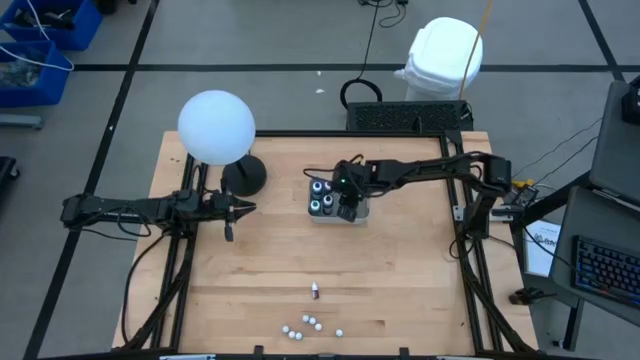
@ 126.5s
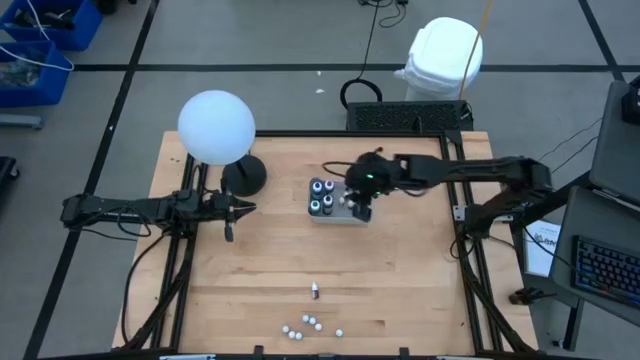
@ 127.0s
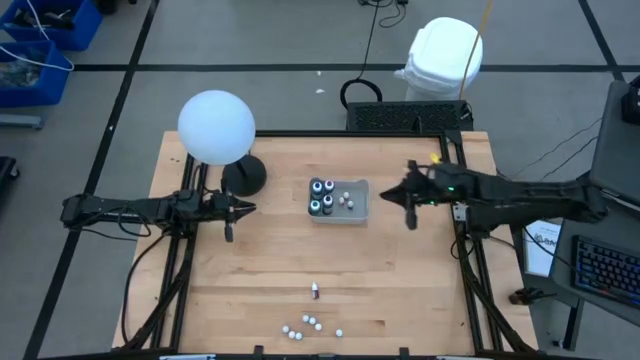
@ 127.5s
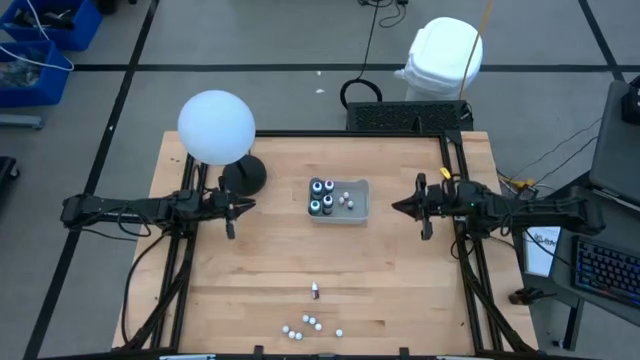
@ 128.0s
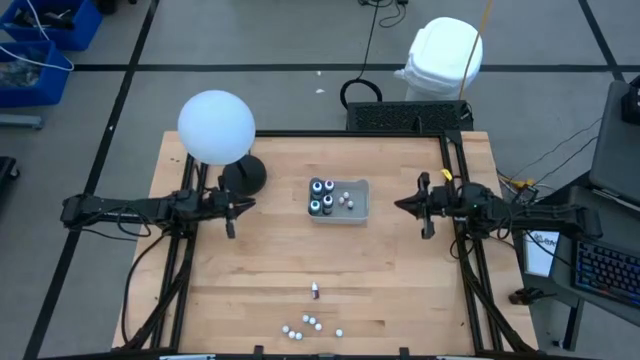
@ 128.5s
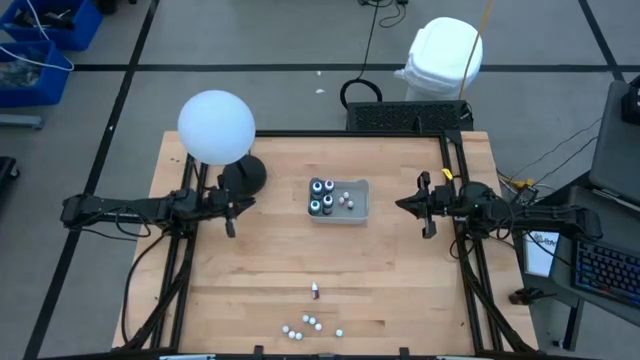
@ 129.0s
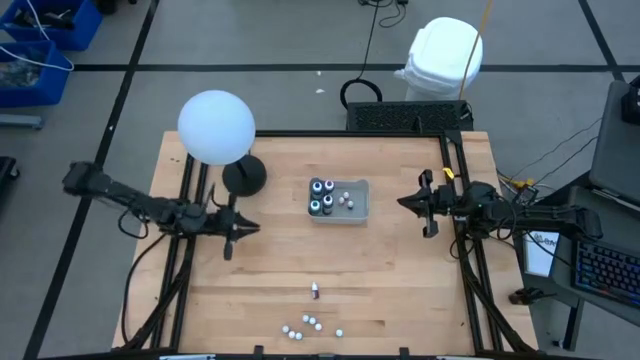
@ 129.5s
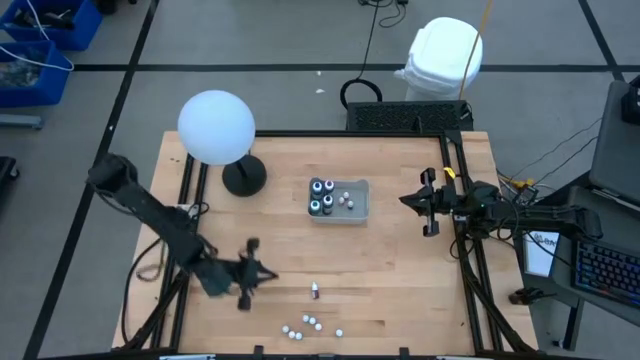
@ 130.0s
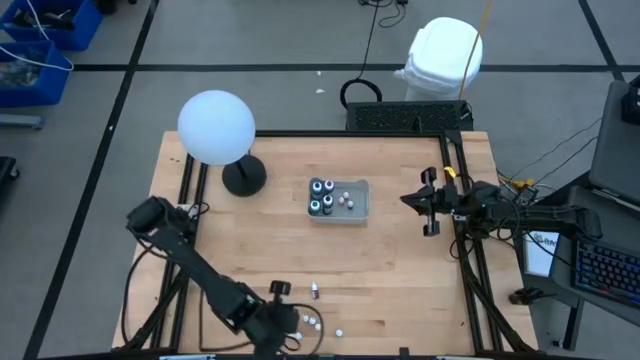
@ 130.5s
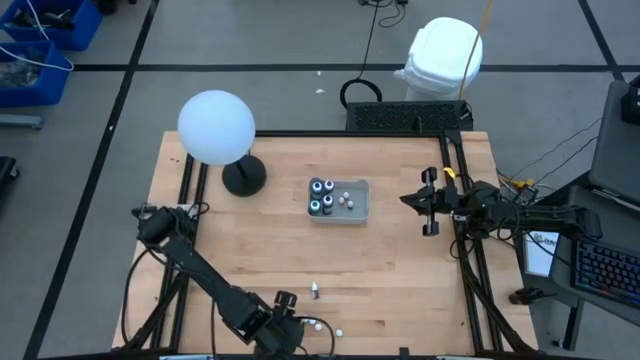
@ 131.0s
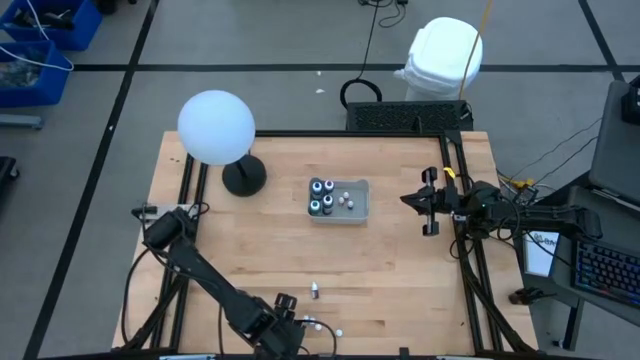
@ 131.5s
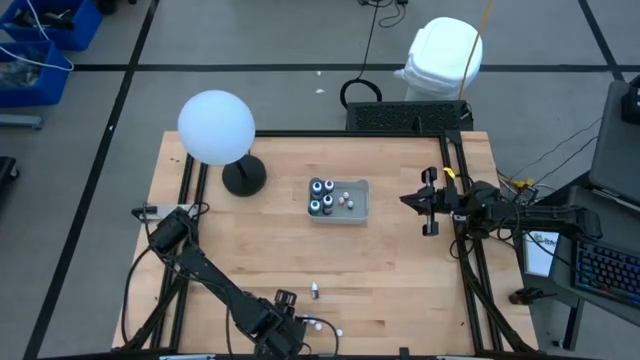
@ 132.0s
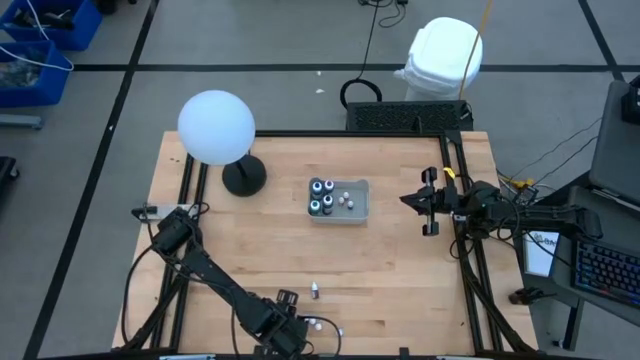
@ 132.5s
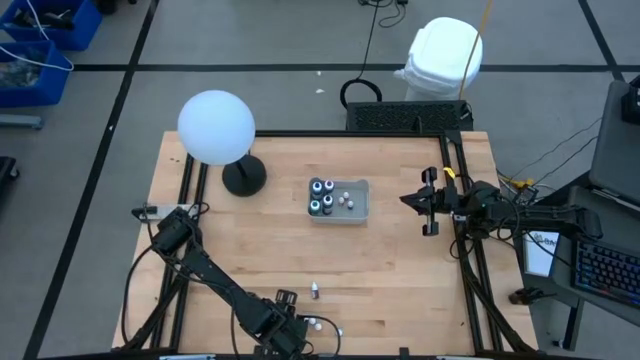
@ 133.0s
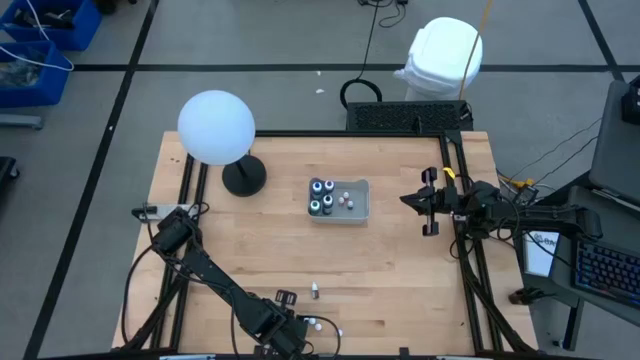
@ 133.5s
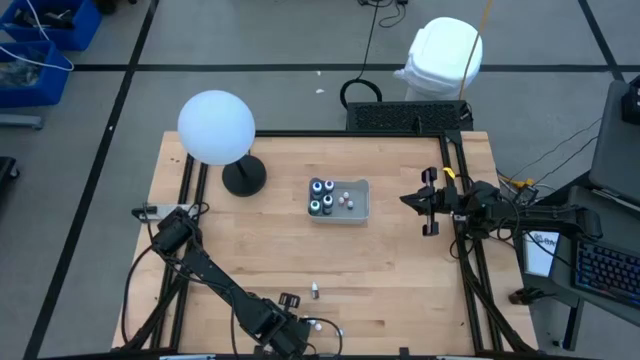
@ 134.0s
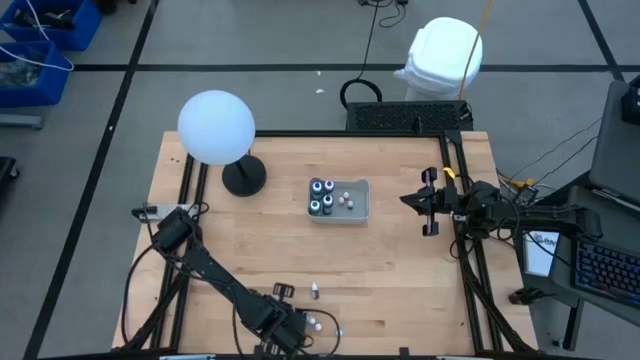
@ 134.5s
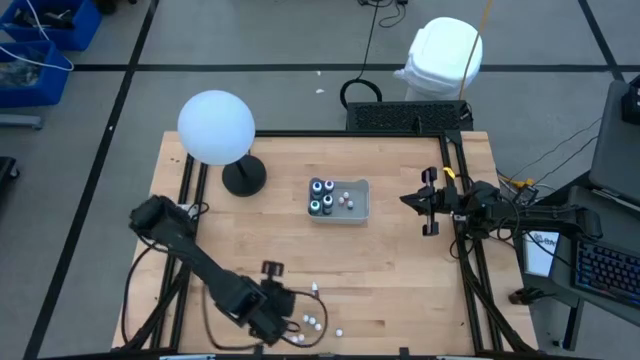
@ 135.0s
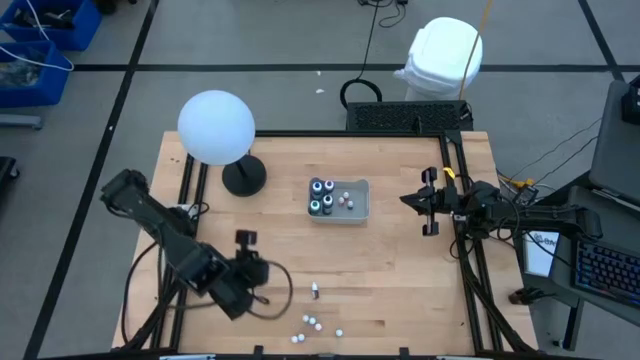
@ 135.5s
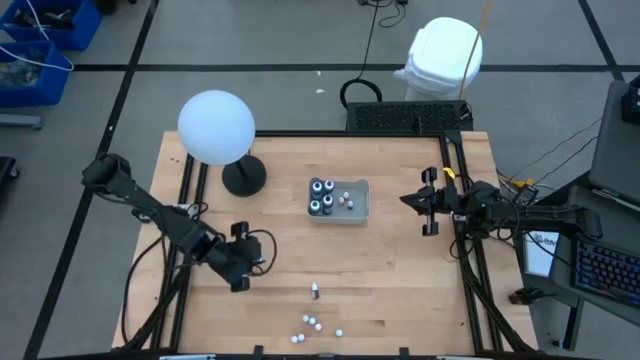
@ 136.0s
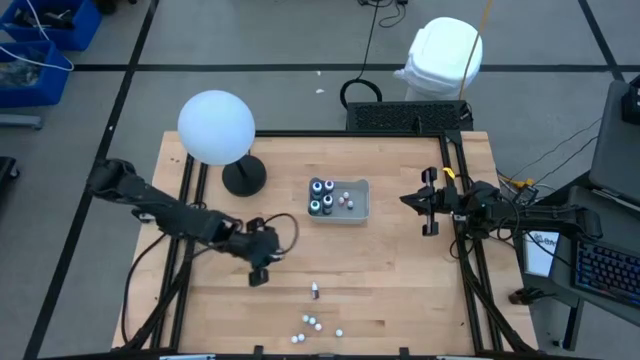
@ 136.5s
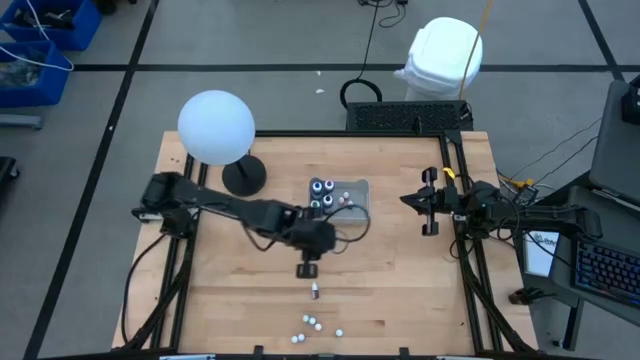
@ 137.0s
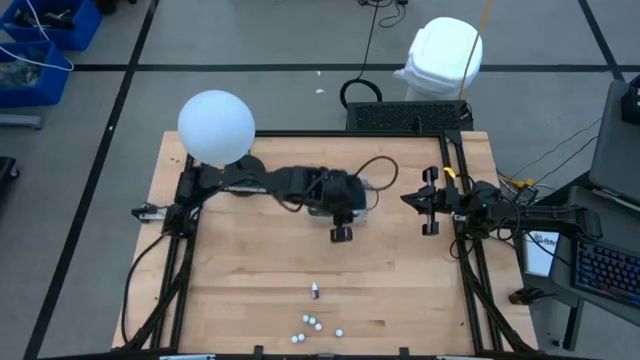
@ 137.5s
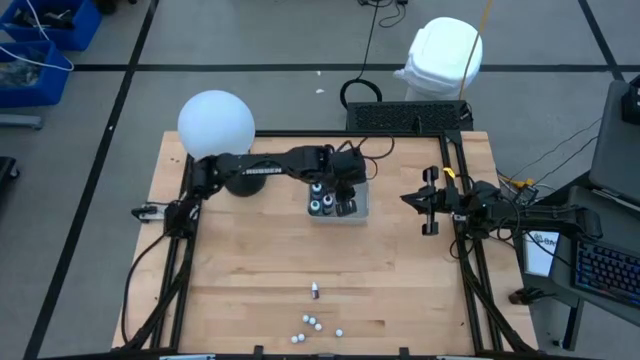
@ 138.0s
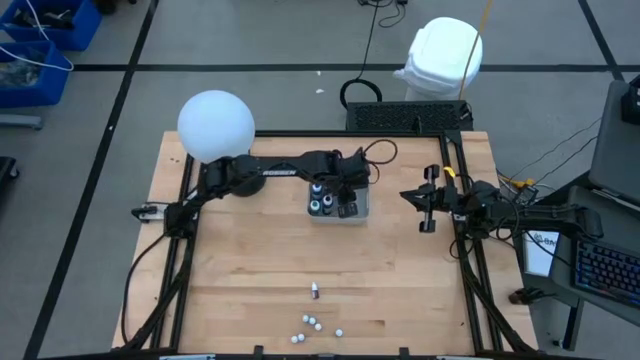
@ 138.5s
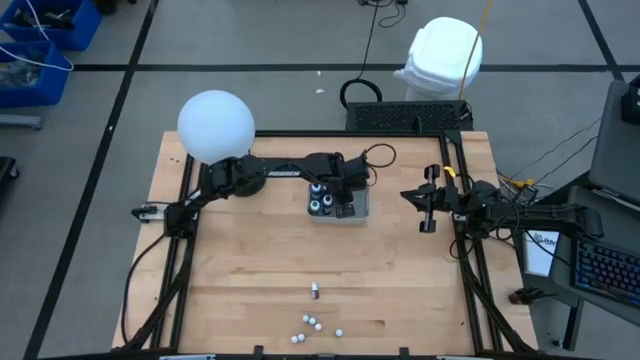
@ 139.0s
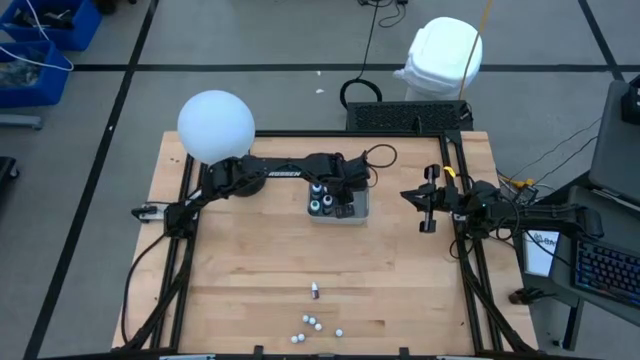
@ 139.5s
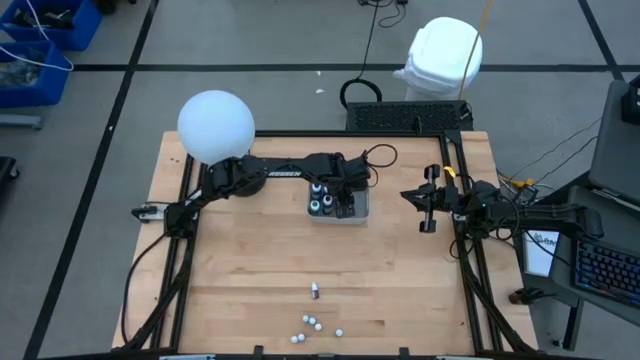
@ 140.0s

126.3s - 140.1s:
Task: Pick & Place food coloring
Put the left small blue food coloring bottle into the gray bin

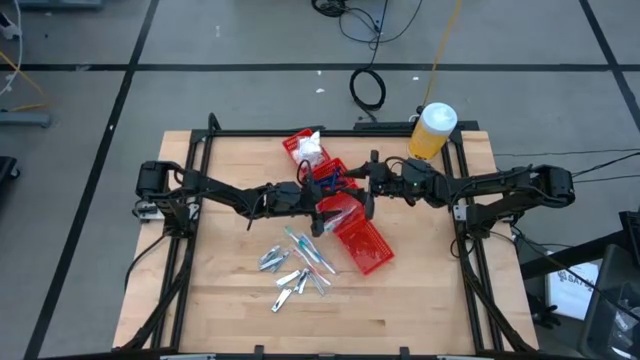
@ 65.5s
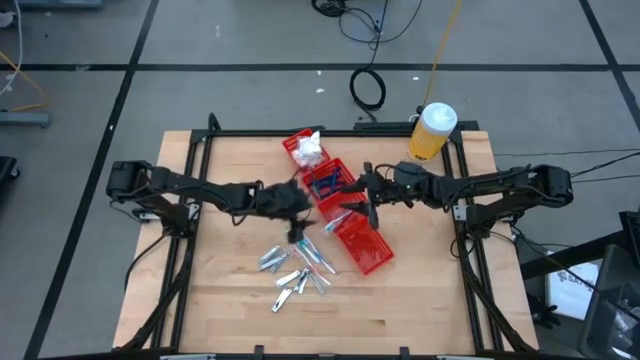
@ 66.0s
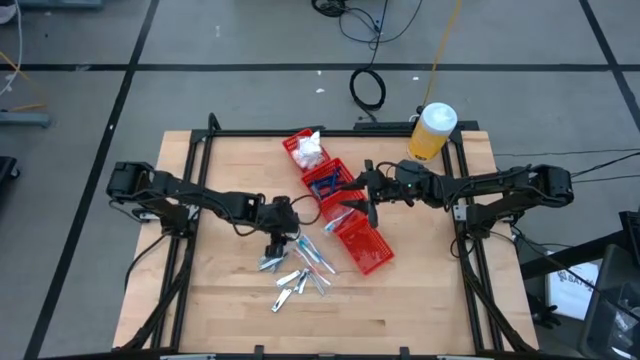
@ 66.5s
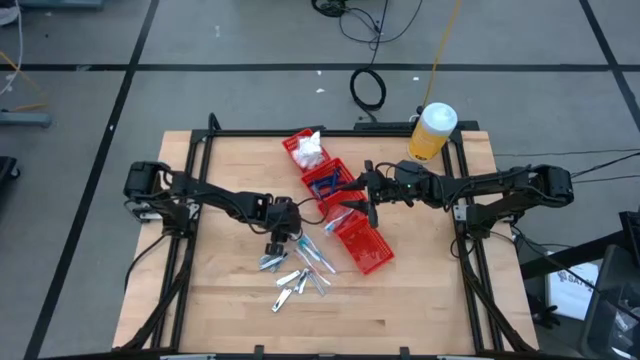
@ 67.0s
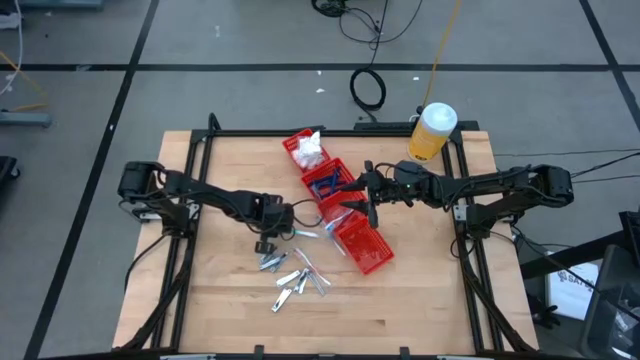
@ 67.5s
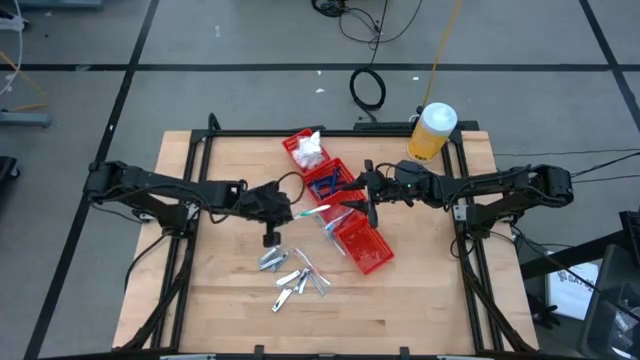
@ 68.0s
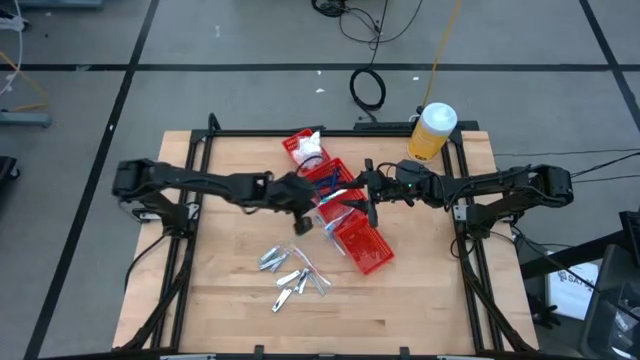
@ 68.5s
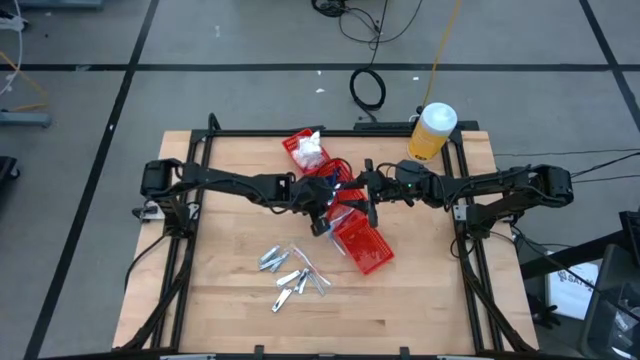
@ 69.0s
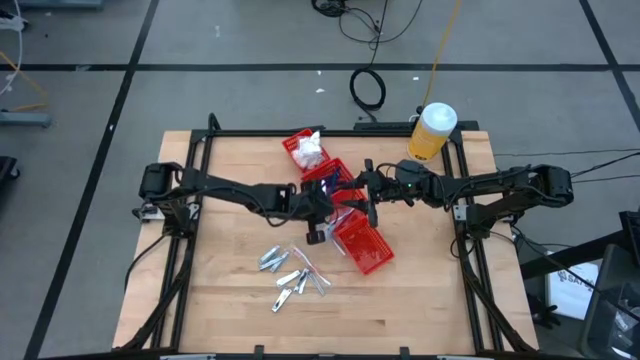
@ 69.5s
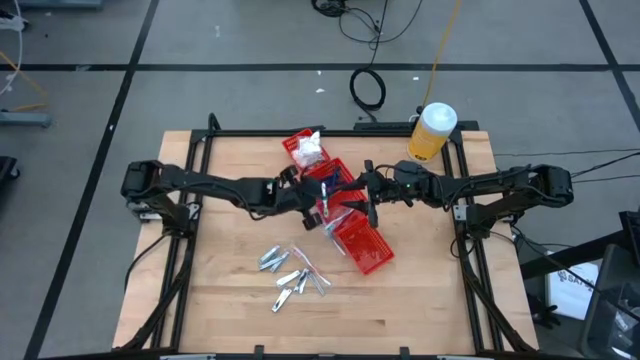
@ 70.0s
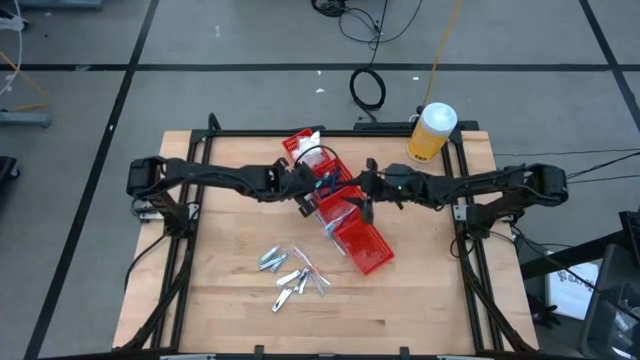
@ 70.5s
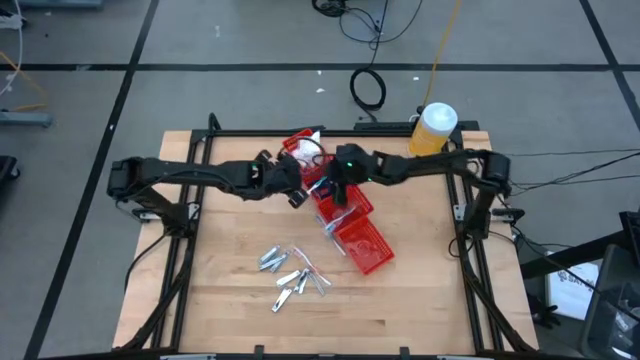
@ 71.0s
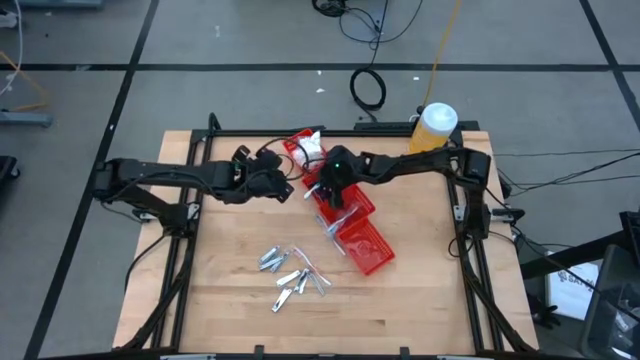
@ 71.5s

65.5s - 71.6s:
Task: Pick & Place Travel size toiletries
Put the green toothbrush into the bottom middle red bin

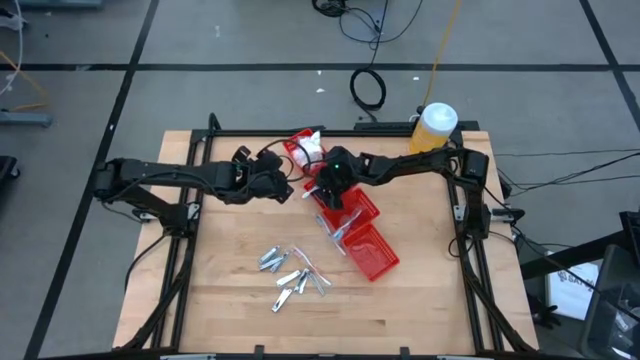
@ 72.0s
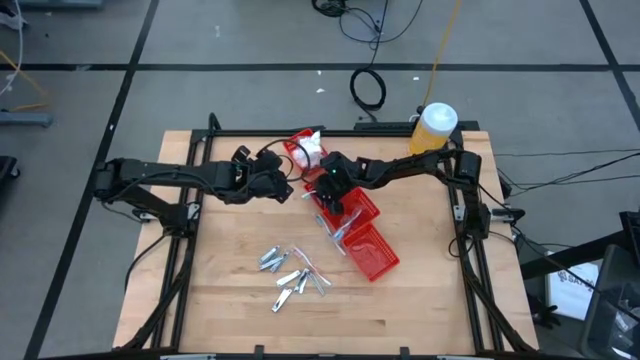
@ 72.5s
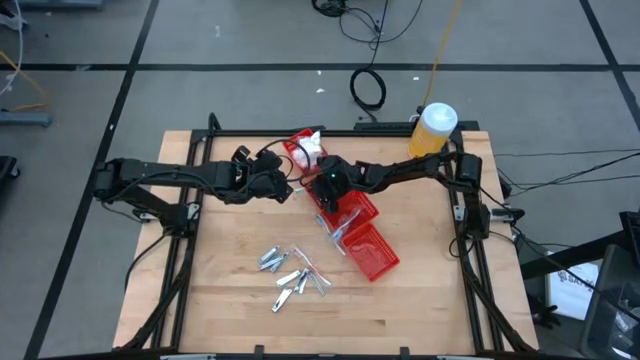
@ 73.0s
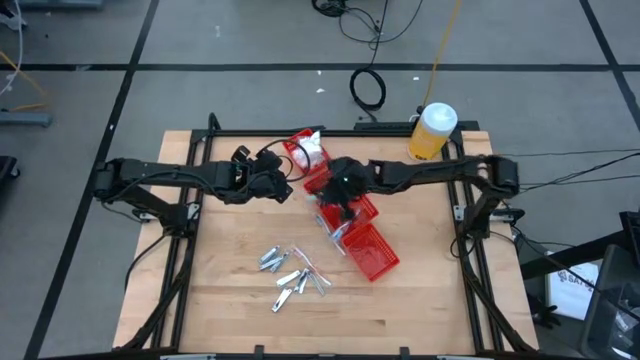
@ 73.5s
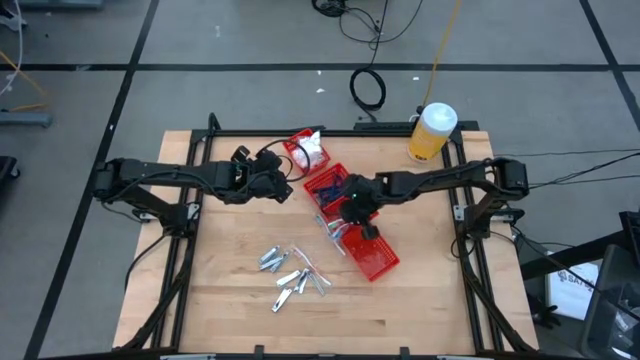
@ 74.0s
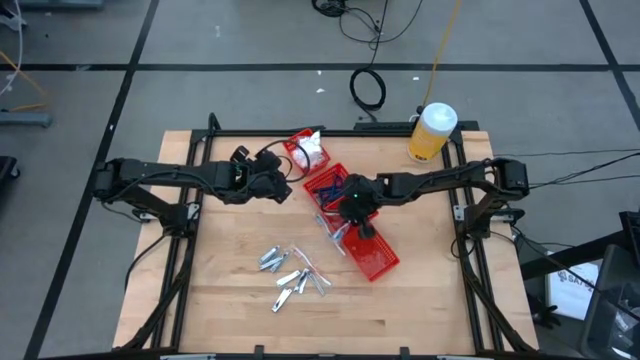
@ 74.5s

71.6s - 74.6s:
Put the green toothbrush into the bottom middle red bin
